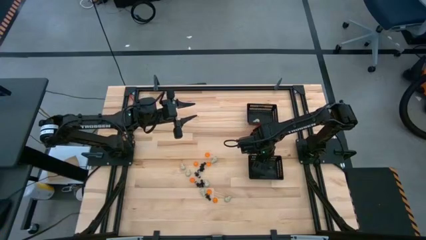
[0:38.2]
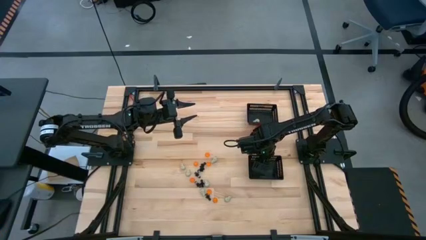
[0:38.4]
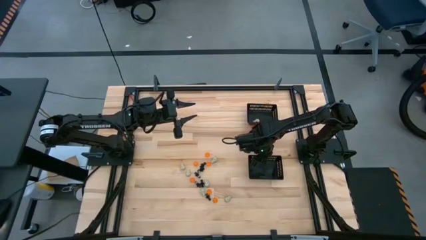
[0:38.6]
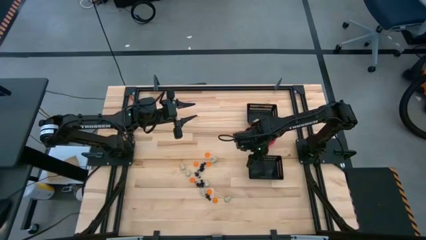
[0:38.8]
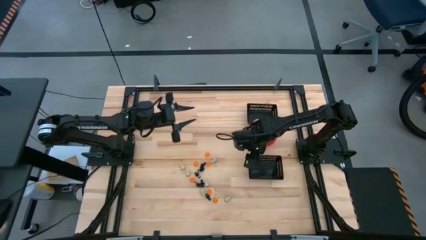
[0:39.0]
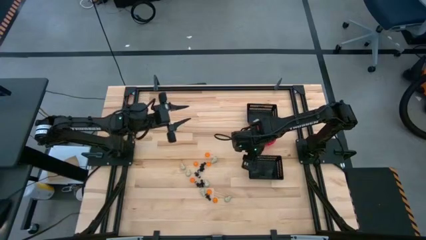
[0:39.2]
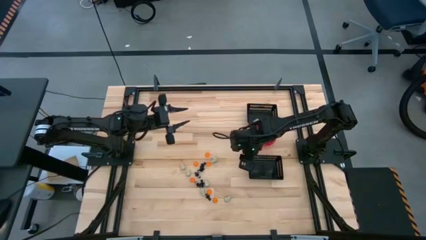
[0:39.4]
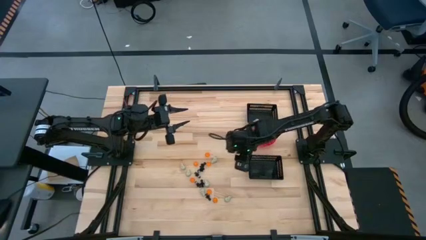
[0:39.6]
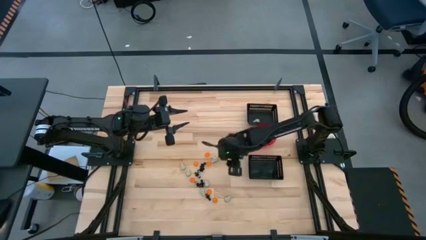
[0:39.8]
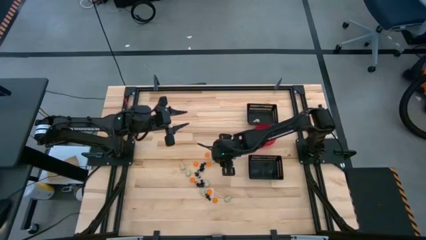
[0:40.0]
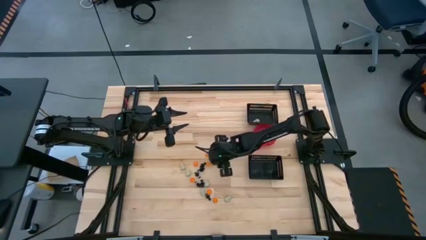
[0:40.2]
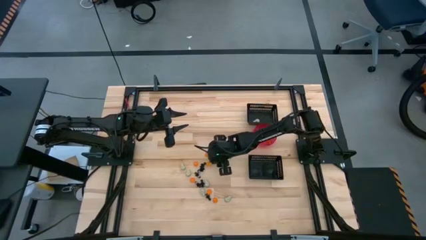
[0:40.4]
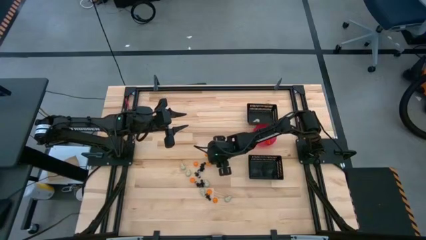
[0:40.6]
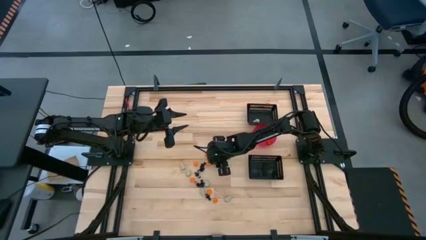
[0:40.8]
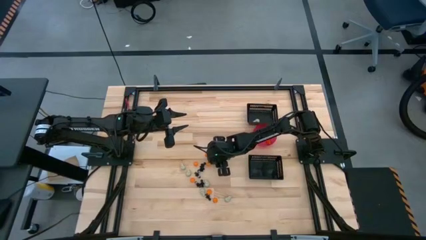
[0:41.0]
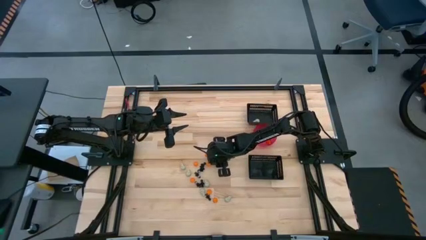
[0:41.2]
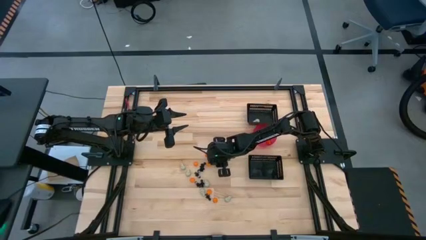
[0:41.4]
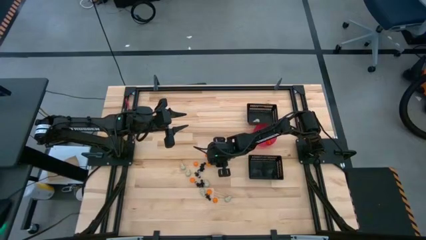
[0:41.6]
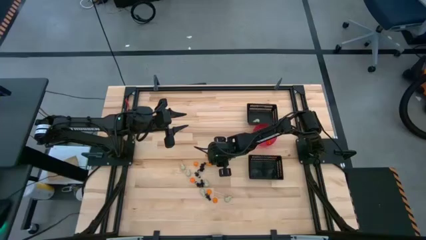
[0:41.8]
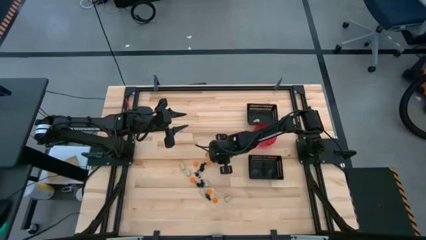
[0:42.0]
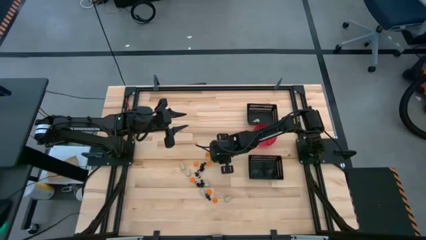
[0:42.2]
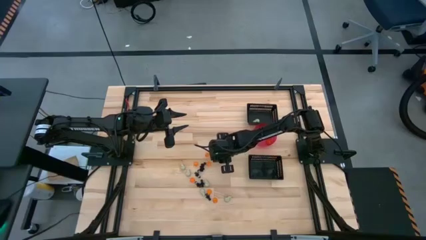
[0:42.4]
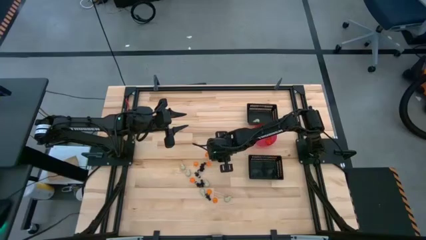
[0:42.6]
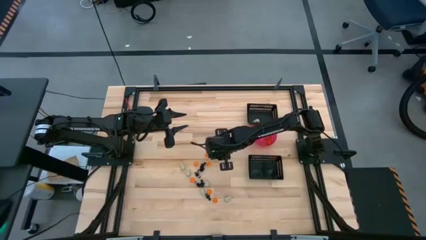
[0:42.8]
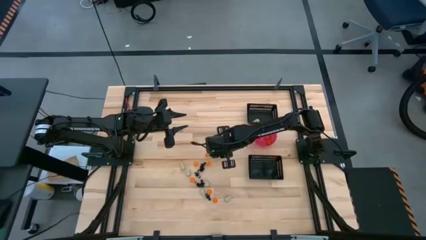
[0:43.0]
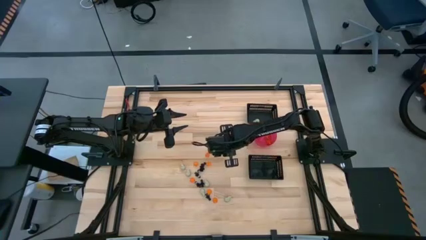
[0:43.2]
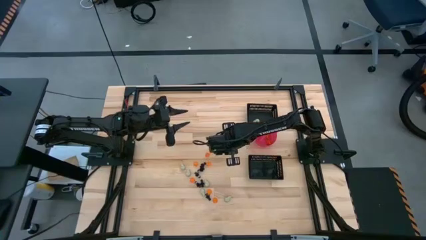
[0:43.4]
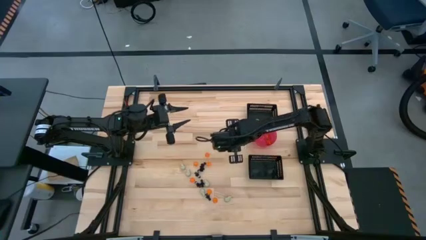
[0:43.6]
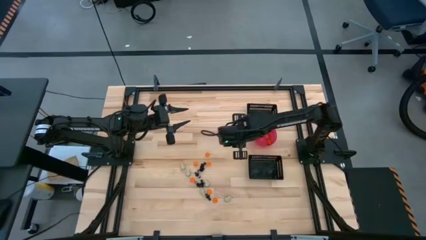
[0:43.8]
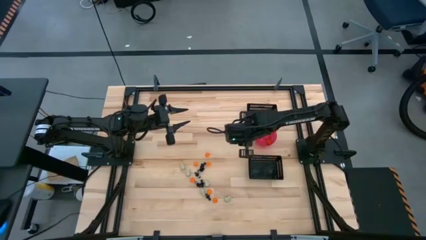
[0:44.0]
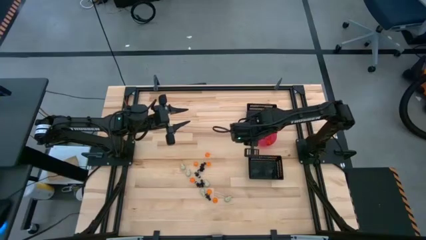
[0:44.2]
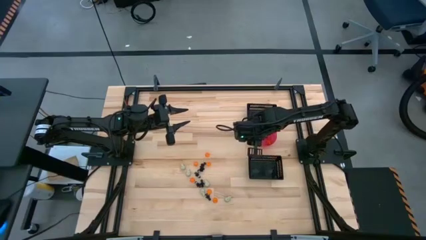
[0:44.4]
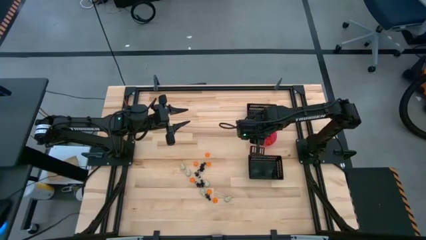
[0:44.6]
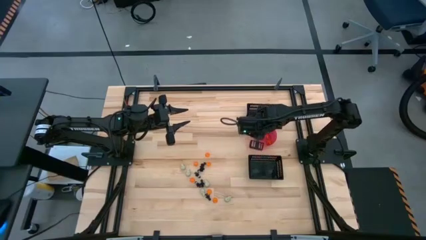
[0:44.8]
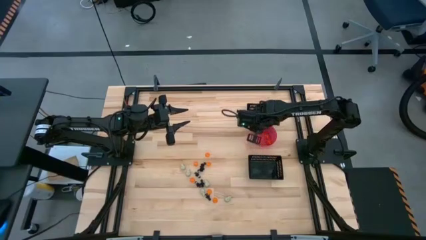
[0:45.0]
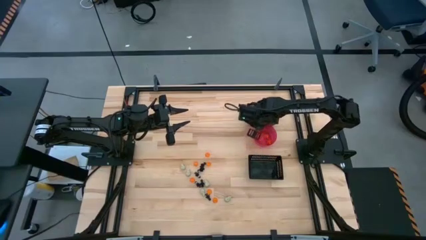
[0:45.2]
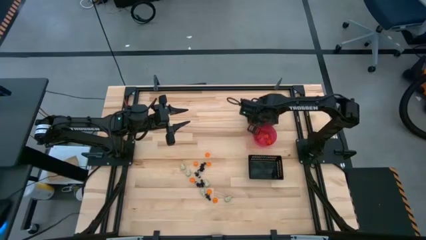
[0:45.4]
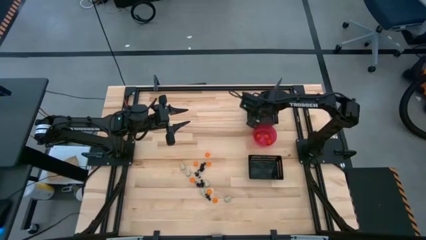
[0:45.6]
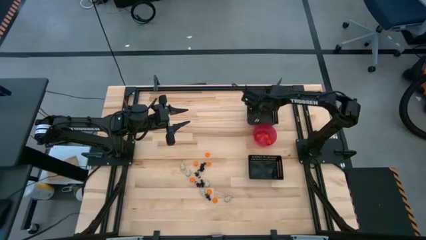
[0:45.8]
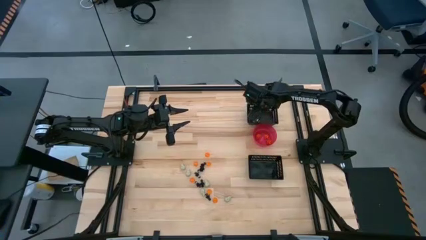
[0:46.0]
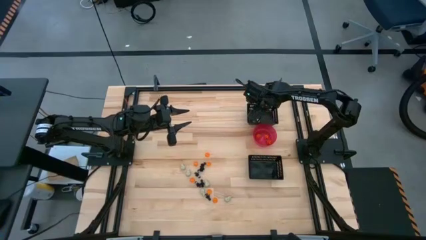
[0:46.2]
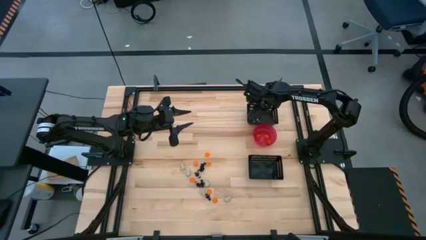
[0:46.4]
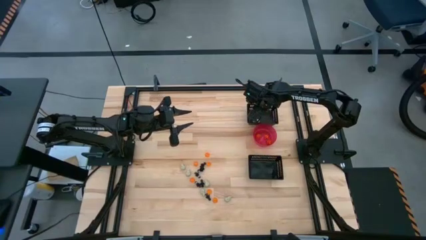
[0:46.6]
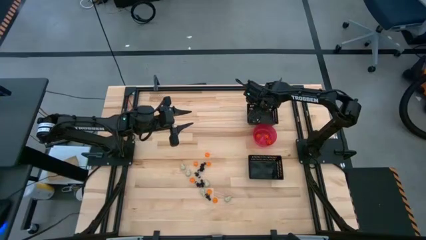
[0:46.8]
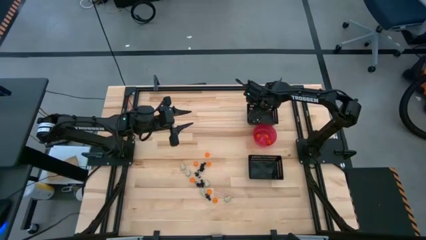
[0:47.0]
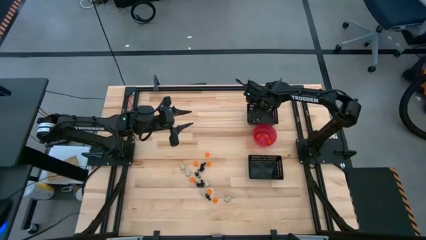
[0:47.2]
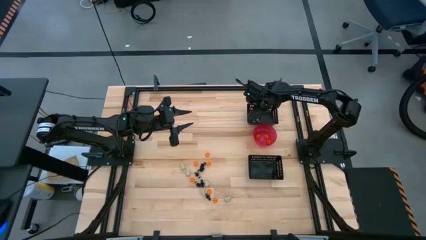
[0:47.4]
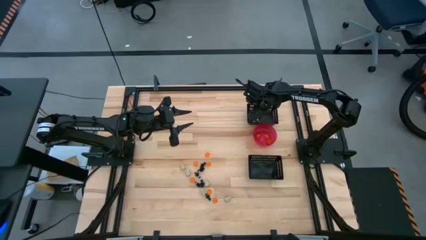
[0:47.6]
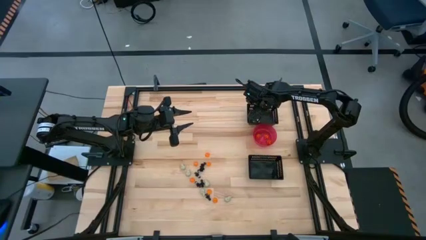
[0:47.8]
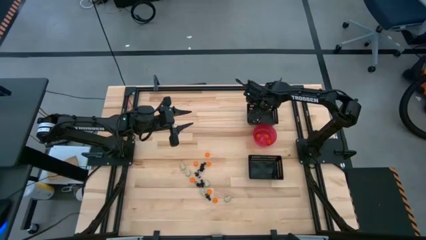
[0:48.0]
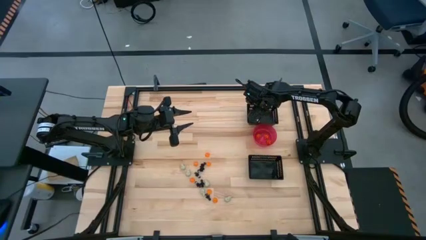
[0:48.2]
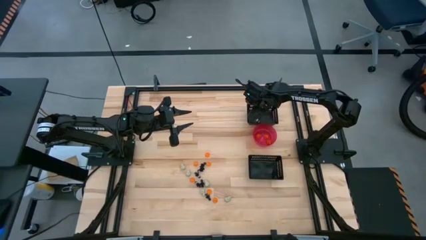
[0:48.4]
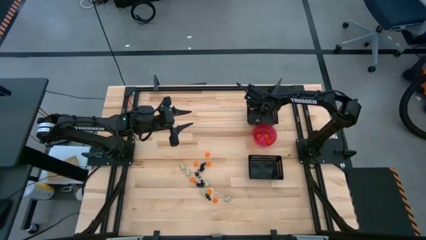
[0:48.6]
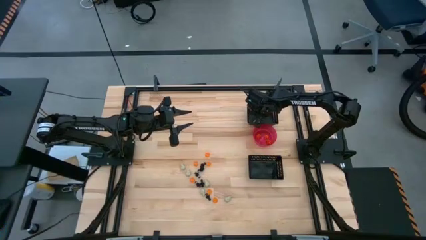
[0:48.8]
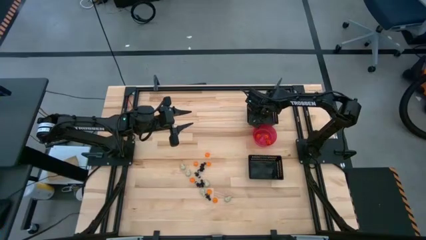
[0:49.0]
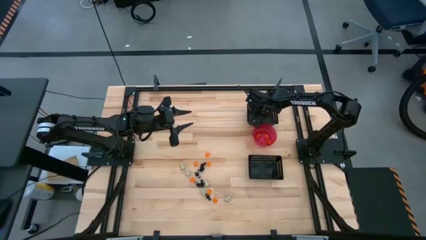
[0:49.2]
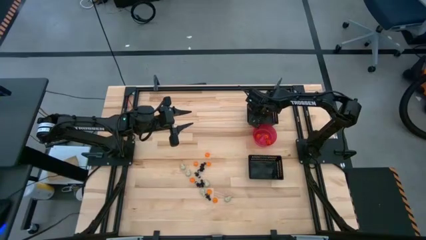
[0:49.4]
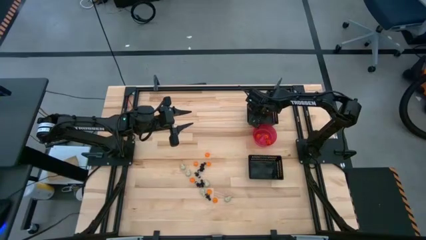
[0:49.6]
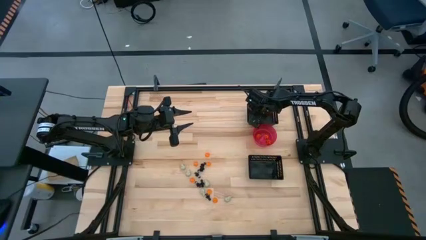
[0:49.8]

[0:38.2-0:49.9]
Task: Sort Halloween decoration
Put the white skull toy into the top black bin

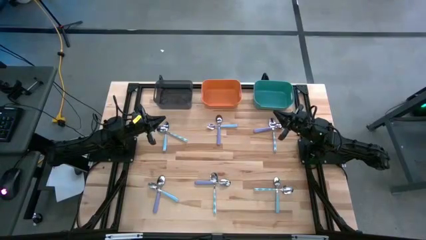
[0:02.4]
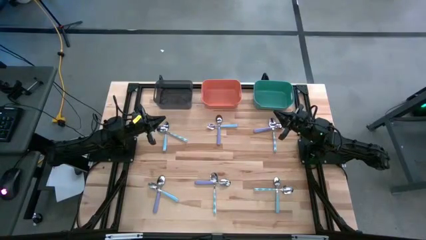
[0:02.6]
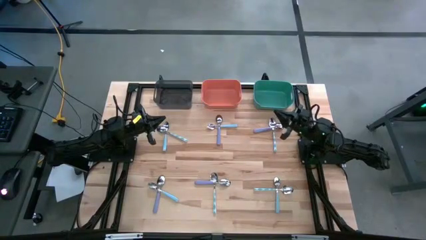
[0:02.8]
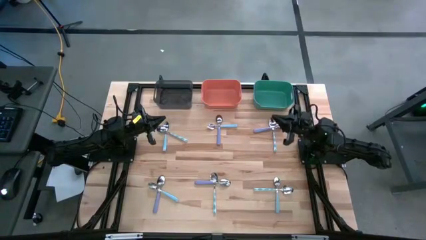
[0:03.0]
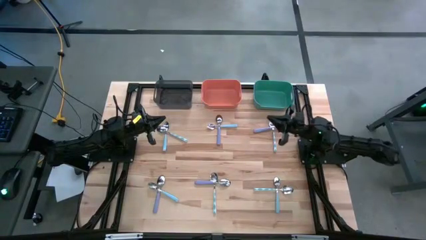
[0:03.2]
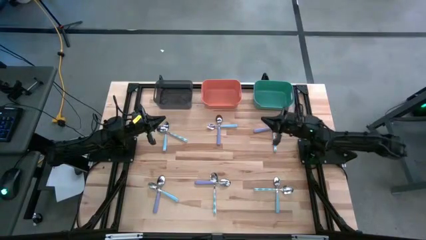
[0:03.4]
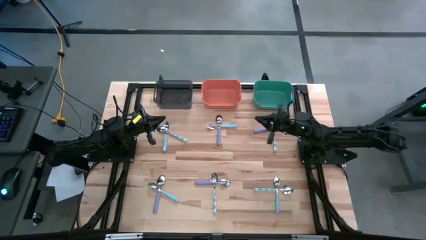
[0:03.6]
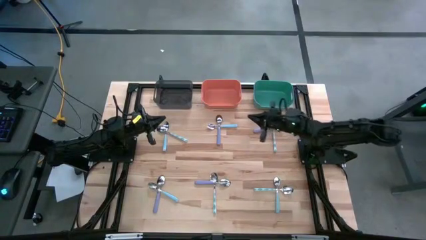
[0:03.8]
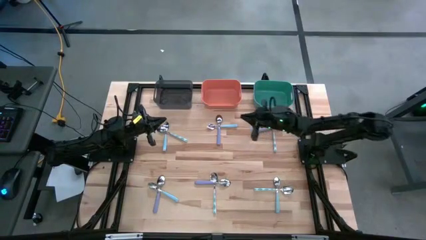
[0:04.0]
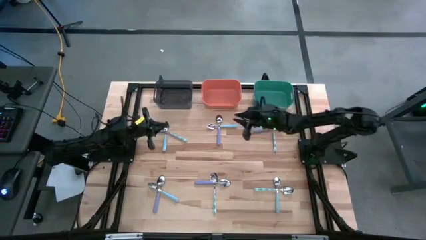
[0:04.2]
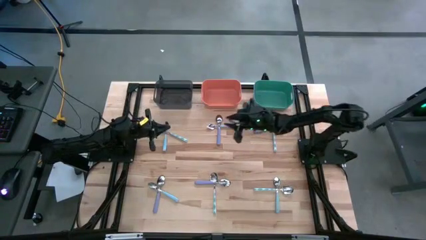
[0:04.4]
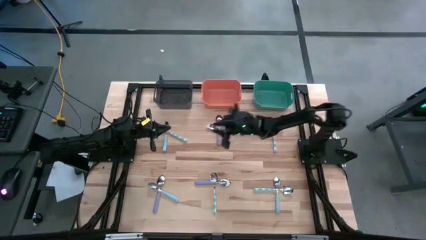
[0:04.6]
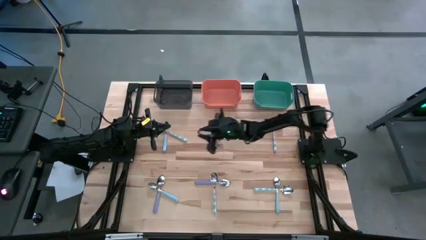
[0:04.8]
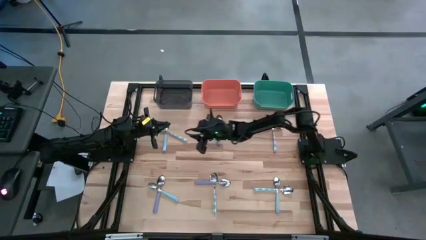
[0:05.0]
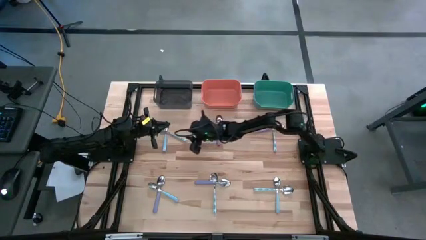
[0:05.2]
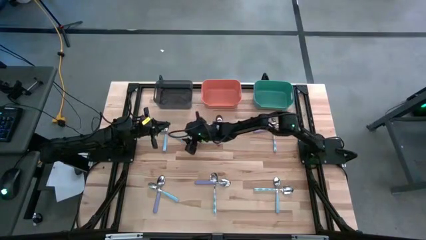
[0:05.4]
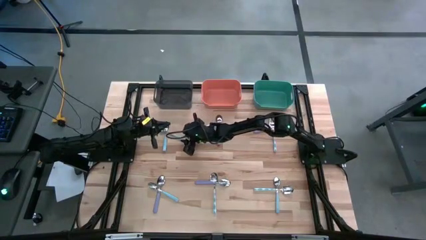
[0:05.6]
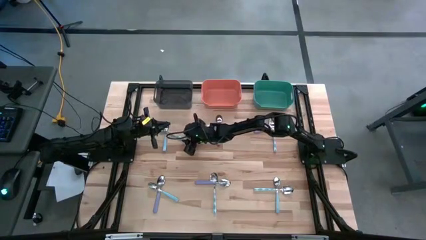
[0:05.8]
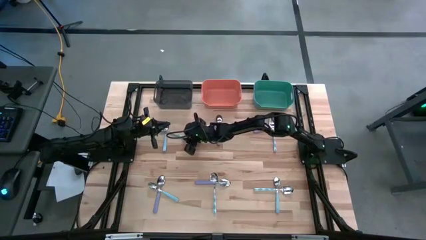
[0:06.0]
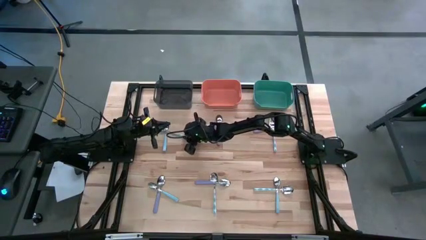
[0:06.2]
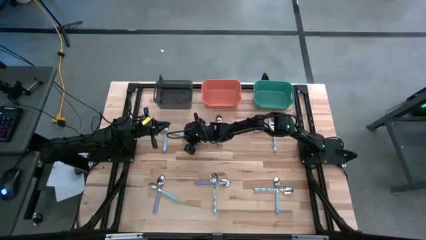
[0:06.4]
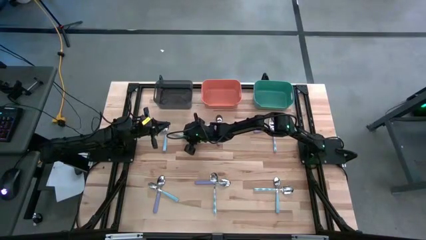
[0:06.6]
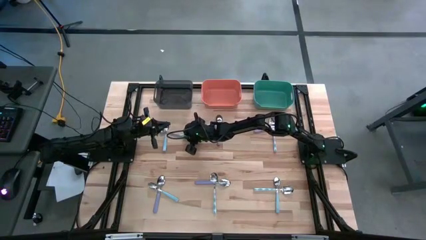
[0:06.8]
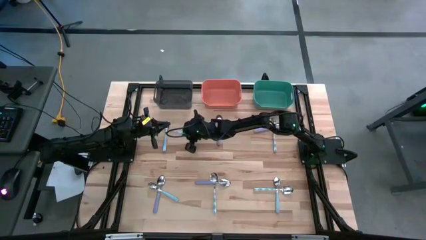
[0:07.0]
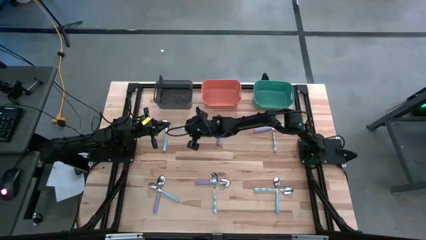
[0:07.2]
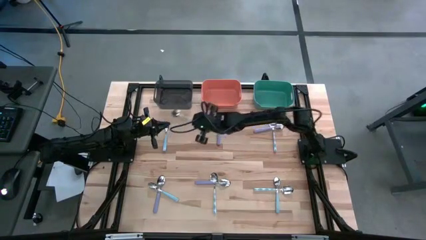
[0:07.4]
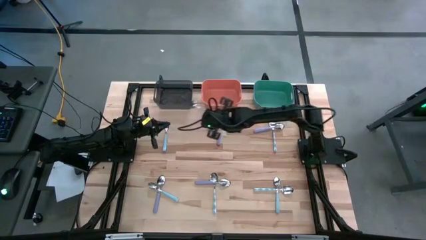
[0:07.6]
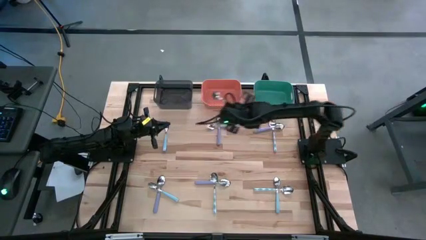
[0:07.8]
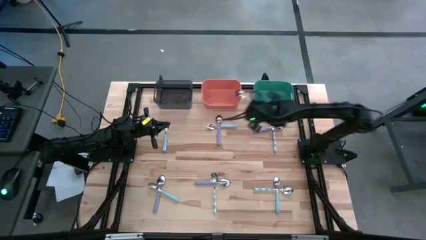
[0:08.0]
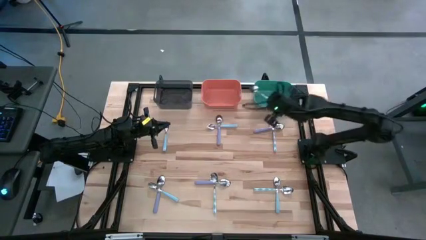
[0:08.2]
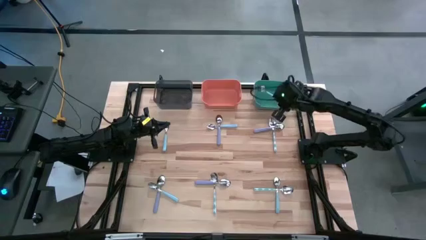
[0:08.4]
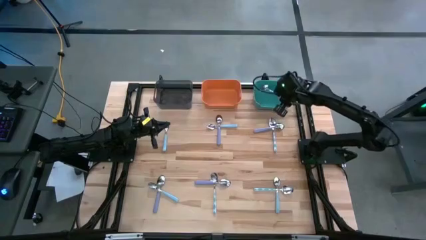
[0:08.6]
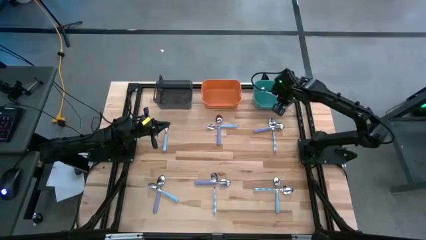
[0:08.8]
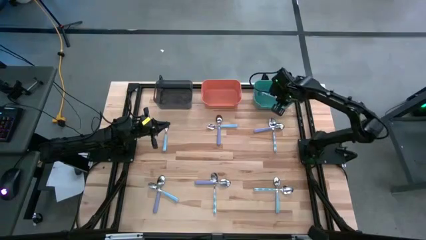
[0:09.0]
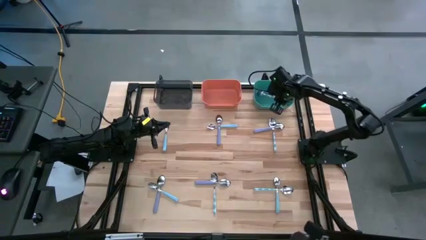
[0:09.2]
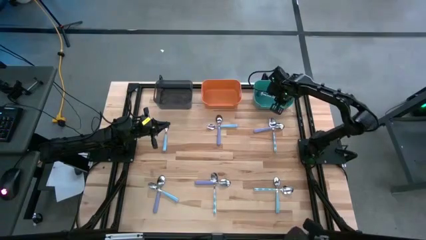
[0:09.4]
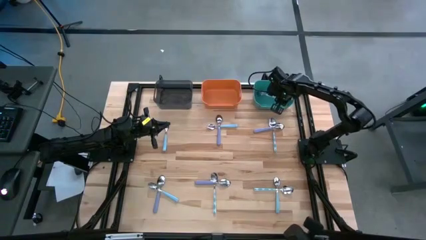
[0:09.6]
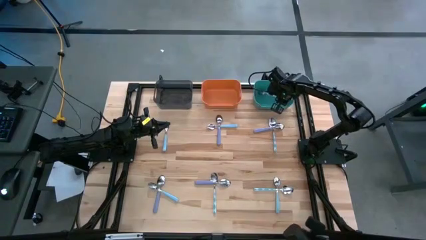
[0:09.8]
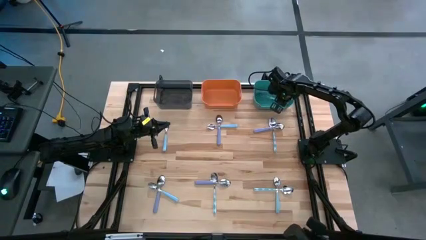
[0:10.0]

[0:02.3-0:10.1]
Task: Sort silverware by color (type)
Put the blue patterned spoon into the green bin
